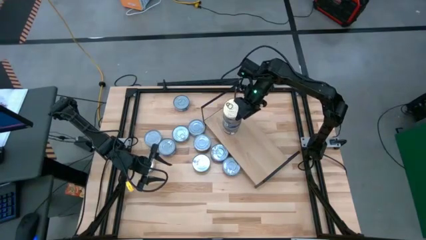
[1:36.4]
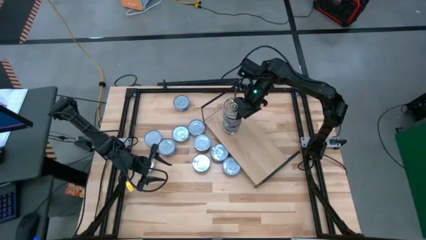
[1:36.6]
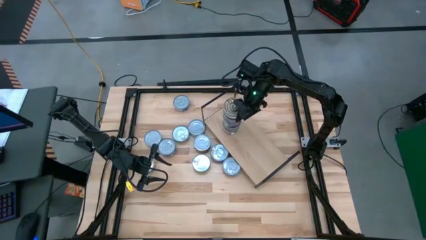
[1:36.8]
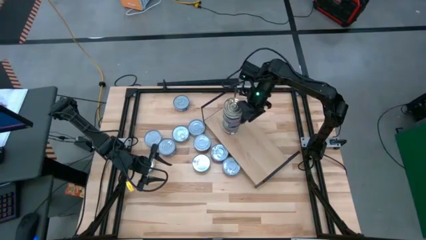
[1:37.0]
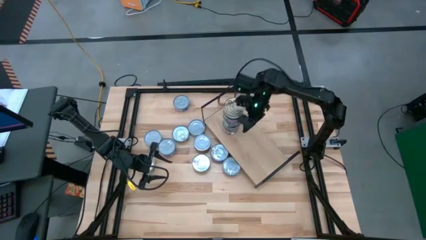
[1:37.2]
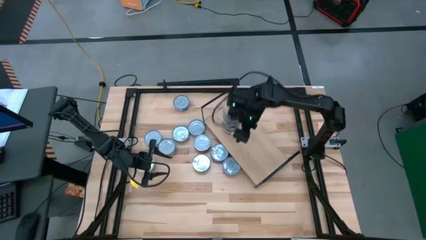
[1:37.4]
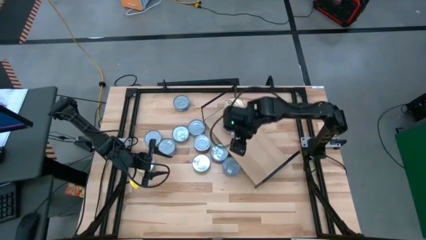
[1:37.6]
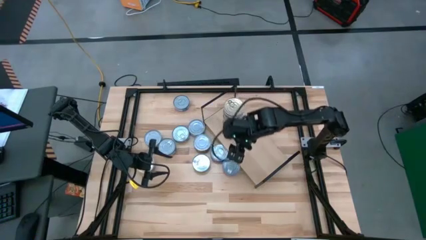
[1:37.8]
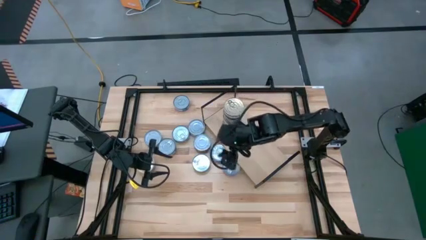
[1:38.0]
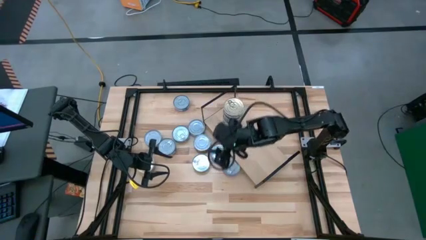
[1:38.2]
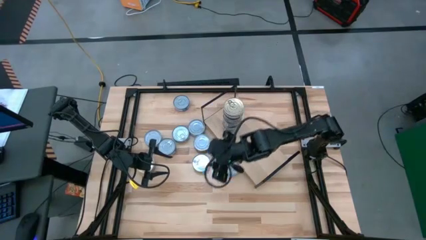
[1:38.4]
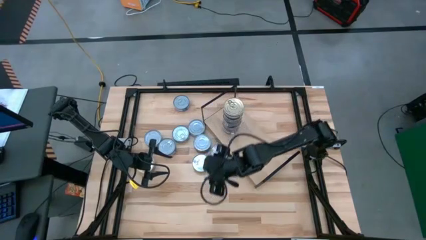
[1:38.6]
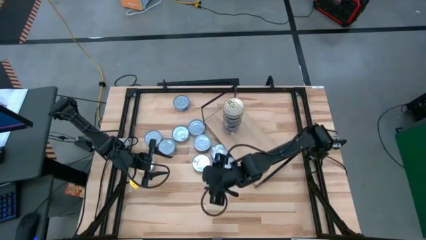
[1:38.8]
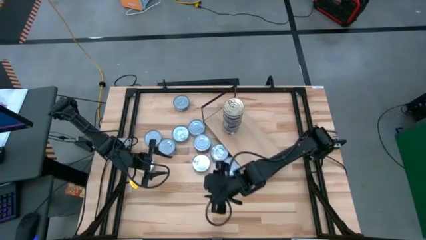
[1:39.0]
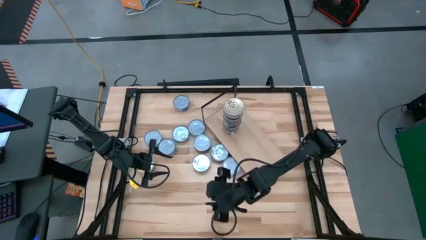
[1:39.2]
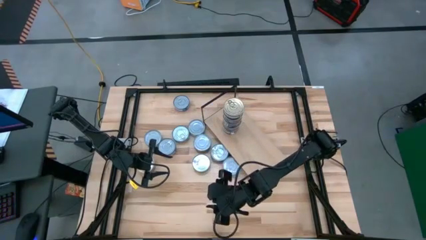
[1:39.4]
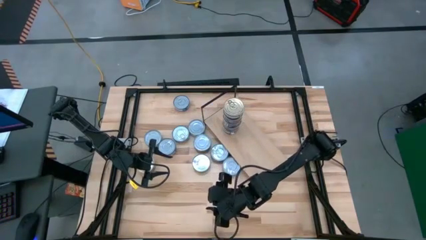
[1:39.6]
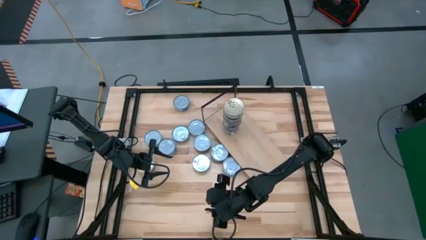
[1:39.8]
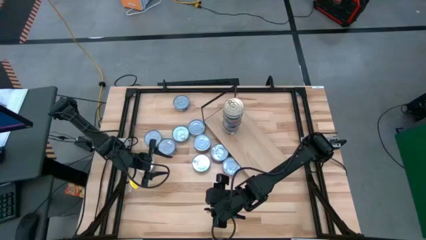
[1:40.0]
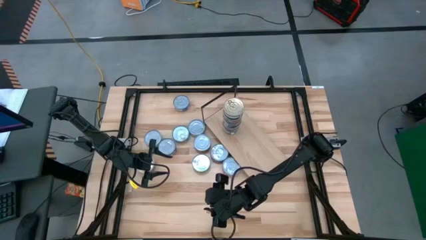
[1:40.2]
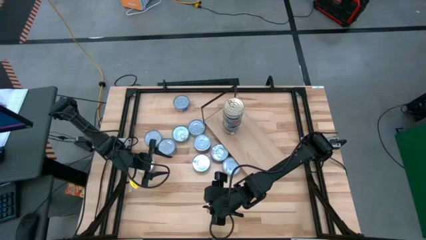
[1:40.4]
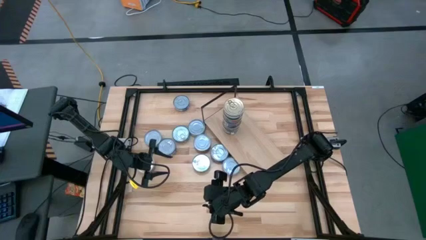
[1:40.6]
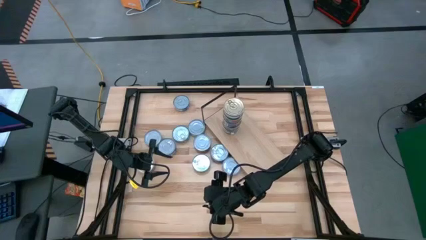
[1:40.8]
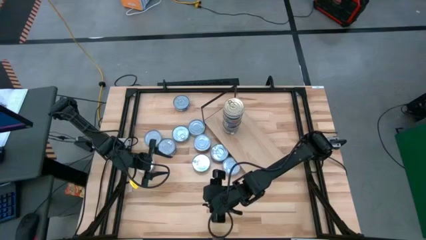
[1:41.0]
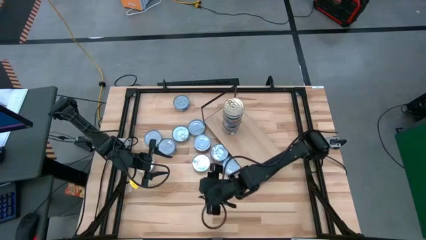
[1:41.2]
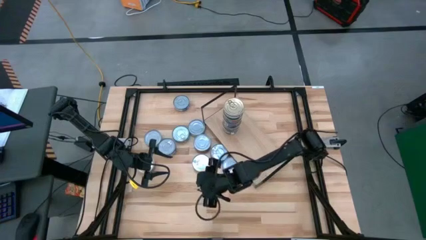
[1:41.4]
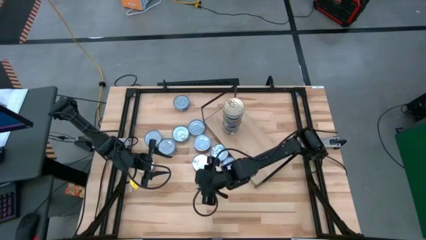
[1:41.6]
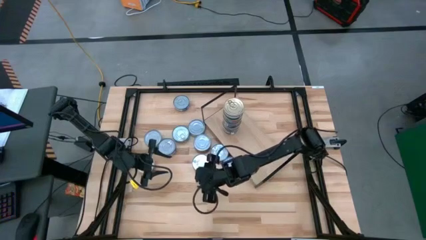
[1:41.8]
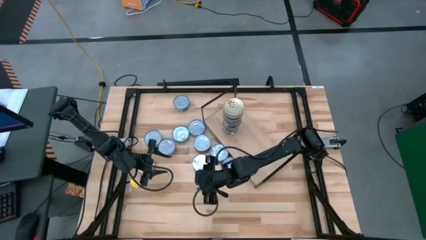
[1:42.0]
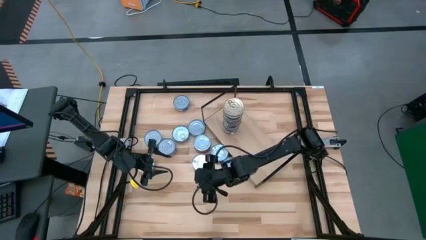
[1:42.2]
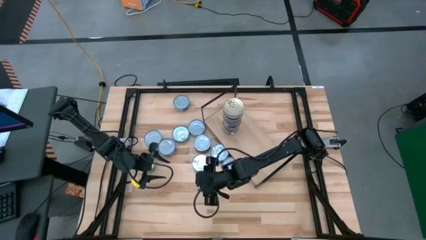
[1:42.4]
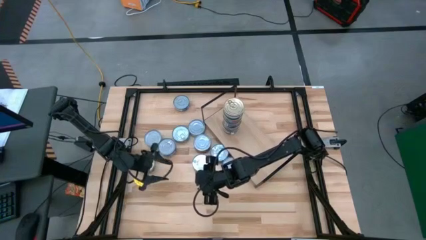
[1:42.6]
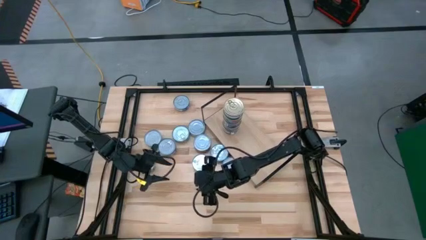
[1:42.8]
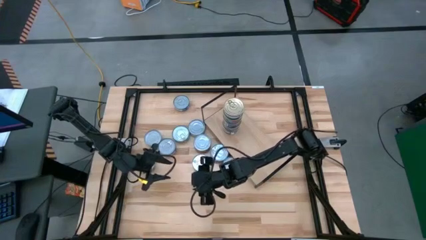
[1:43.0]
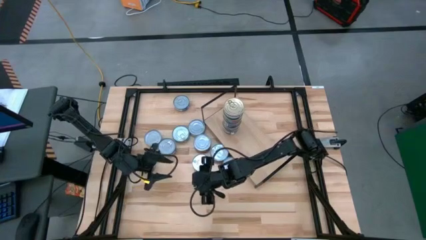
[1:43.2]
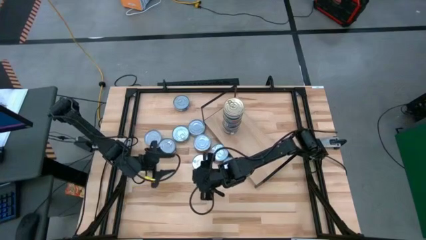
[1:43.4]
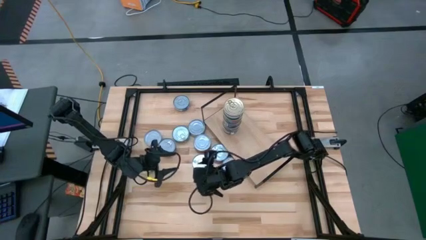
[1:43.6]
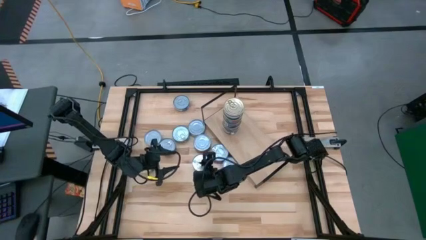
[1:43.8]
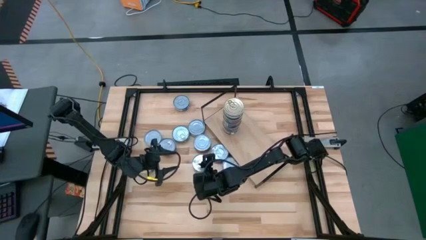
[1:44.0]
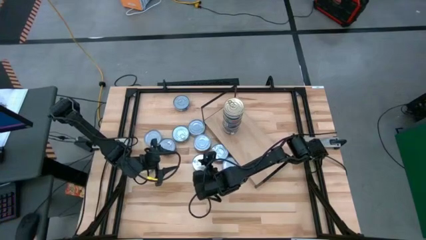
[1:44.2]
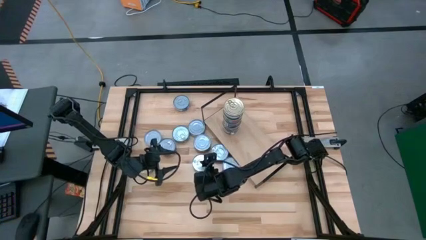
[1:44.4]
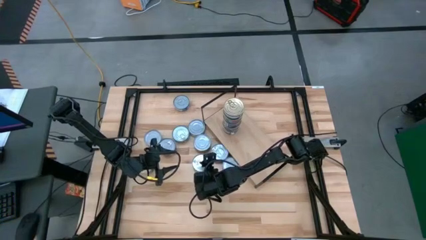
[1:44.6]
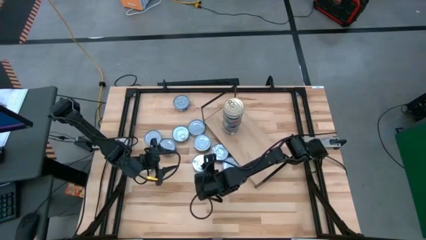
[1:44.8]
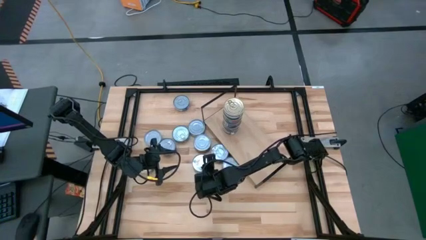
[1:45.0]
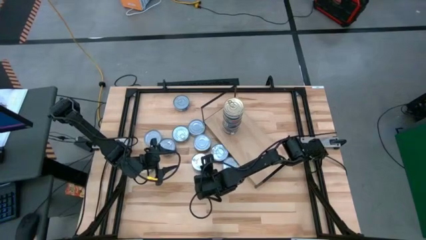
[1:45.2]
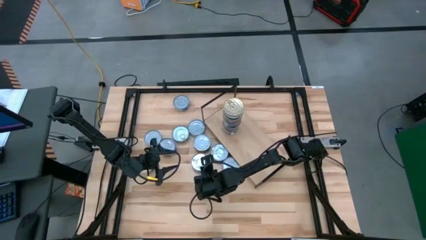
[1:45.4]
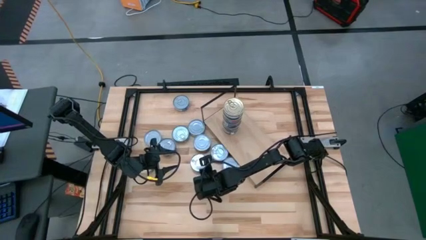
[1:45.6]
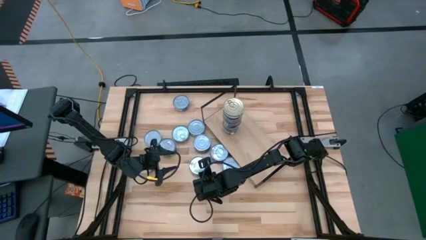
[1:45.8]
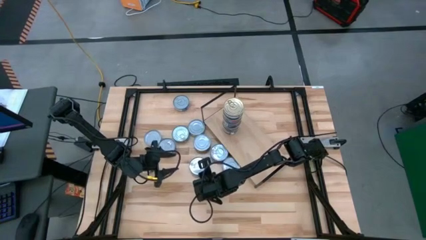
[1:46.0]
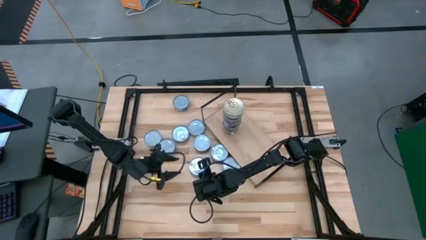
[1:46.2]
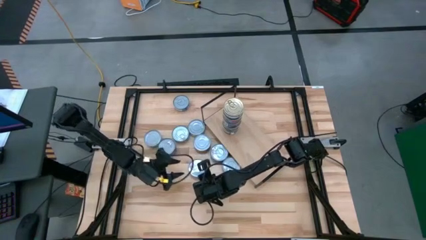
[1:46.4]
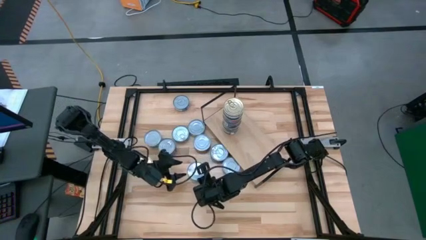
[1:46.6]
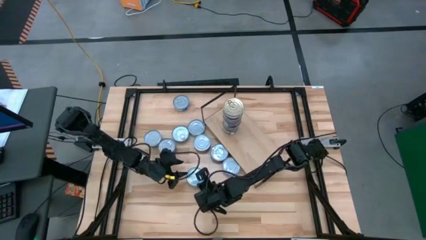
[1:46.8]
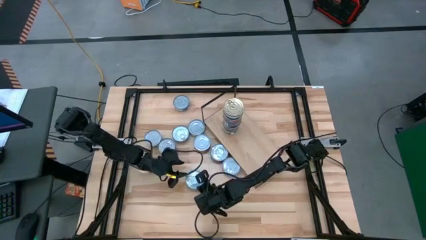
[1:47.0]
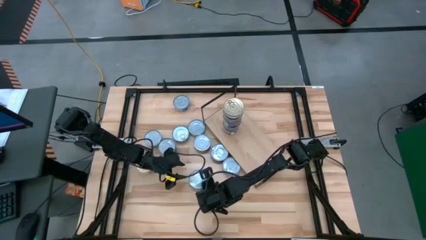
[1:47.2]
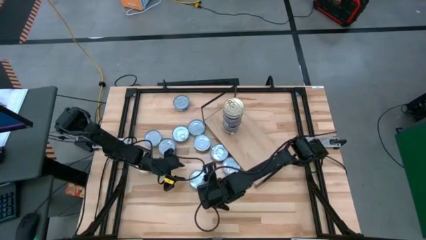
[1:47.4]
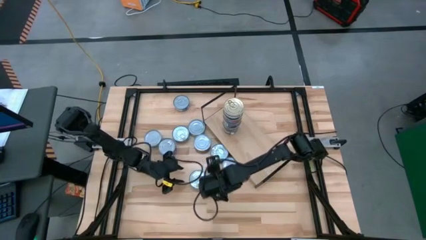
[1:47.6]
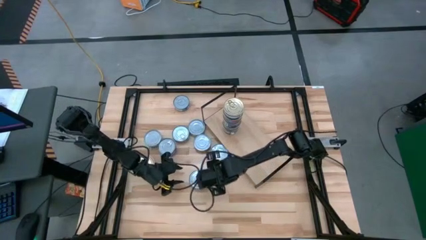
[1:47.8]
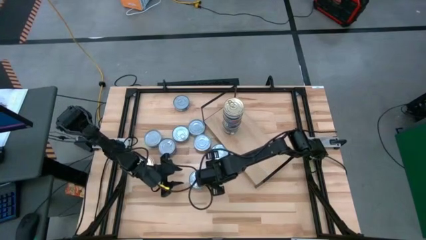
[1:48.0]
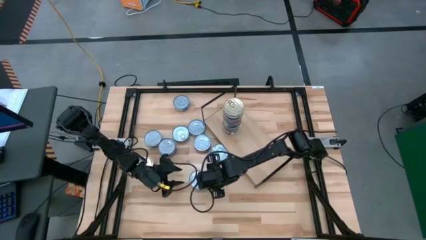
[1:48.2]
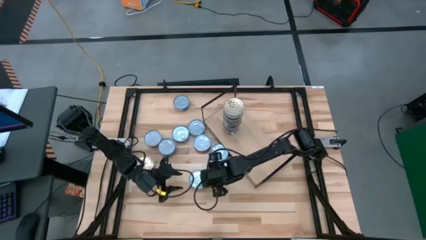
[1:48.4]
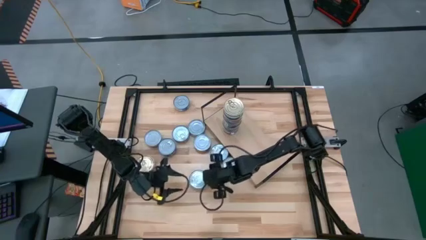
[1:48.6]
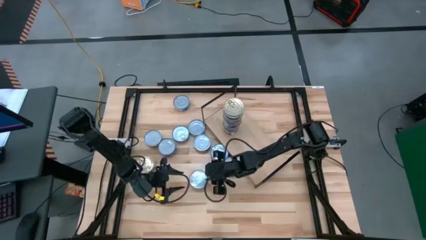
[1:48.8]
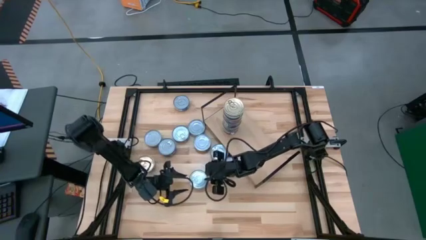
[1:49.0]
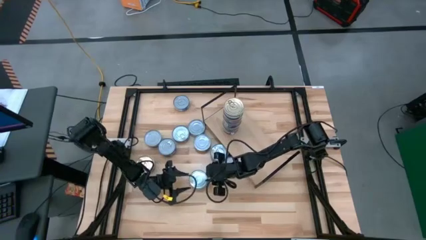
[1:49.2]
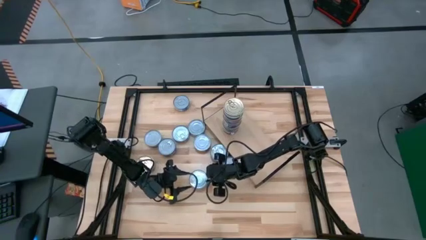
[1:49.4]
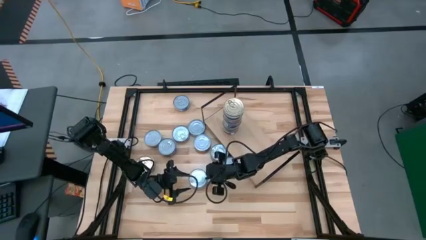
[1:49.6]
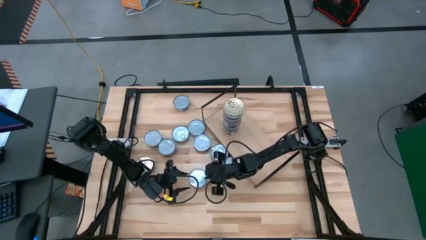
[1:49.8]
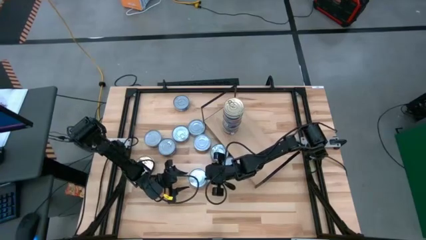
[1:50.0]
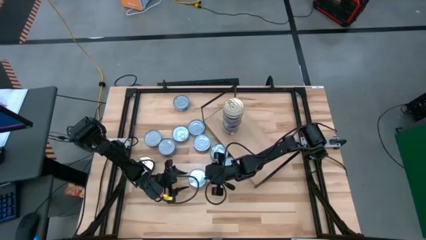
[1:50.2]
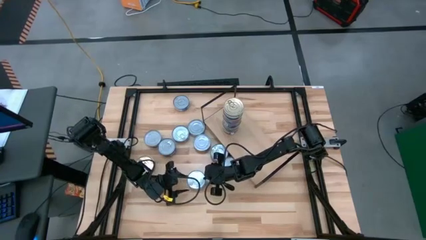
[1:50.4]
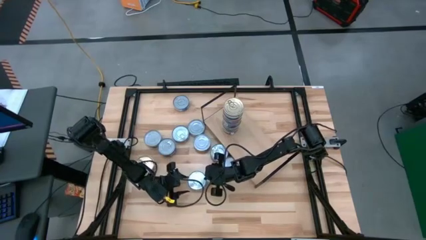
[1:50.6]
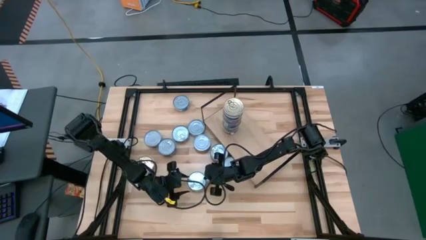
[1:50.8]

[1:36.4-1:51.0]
Task: Stack canned seafood by type on shelf
Adjust the green tuna can

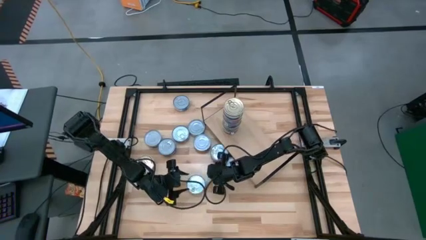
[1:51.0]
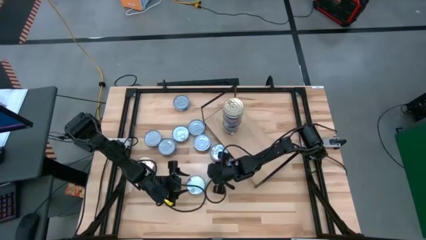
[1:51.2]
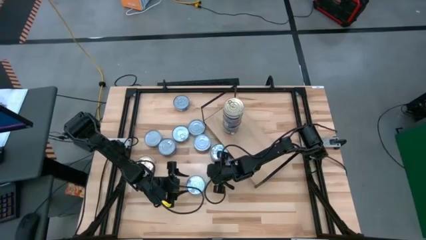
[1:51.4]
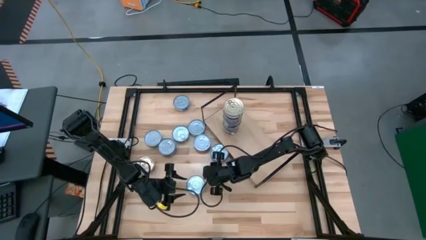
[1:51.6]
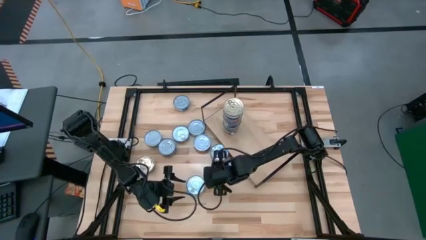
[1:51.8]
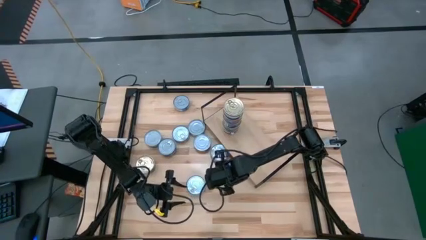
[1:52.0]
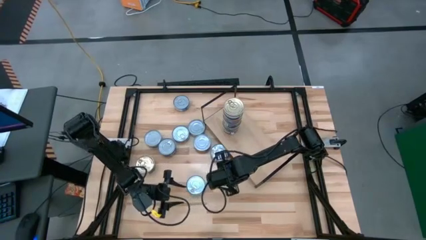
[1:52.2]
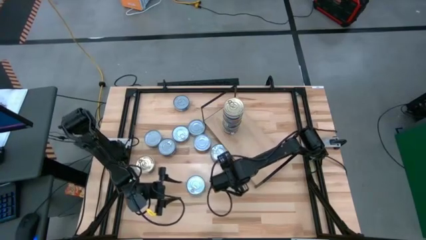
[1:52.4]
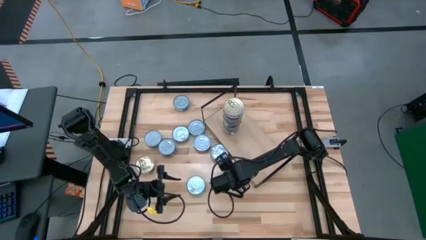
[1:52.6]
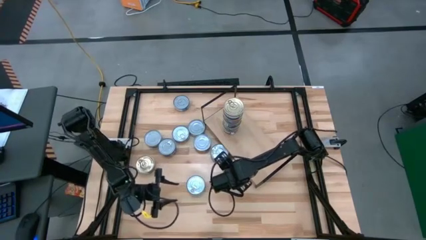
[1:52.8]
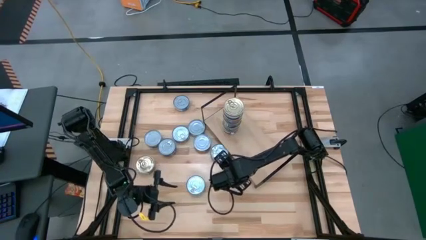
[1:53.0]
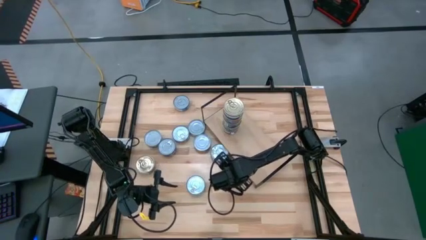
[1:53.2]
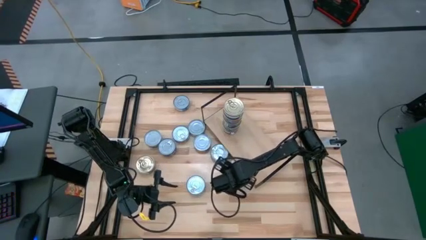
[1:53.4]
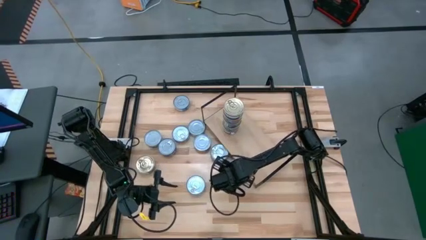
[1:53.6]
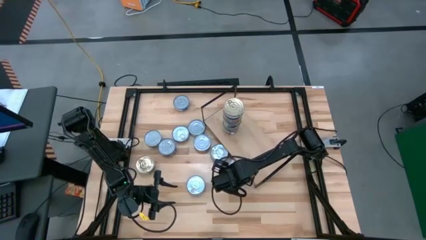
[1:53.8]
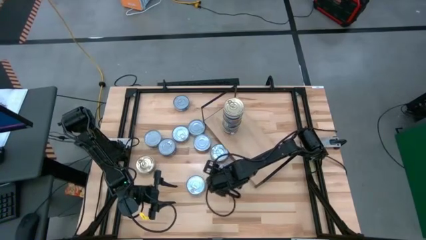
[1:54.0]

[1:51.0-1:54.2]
Adjust the red tuna can
